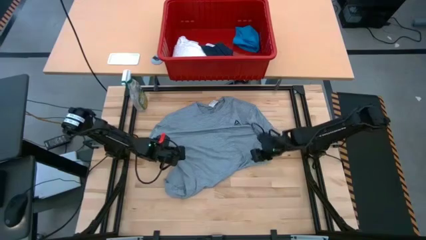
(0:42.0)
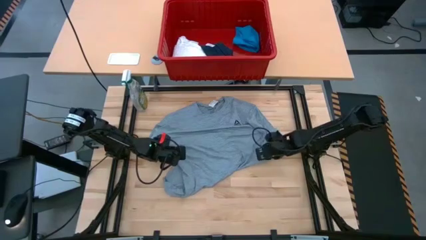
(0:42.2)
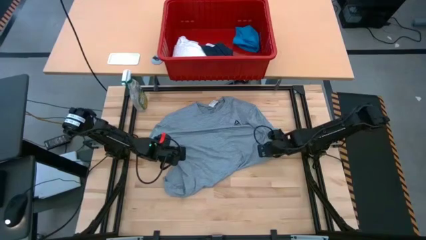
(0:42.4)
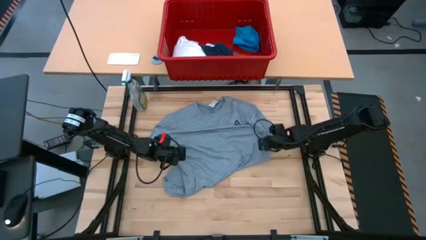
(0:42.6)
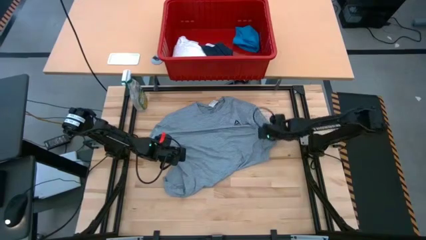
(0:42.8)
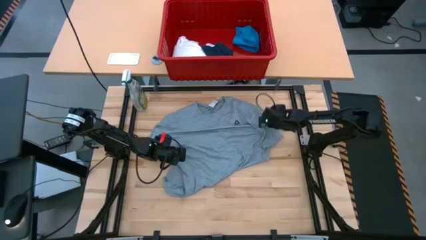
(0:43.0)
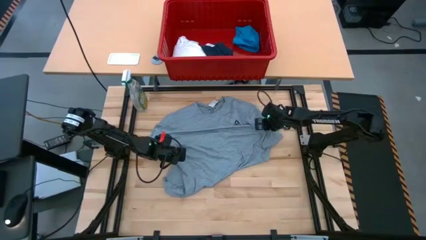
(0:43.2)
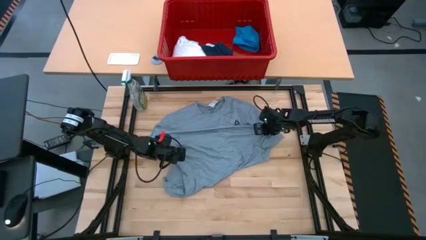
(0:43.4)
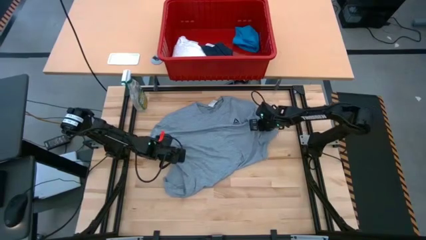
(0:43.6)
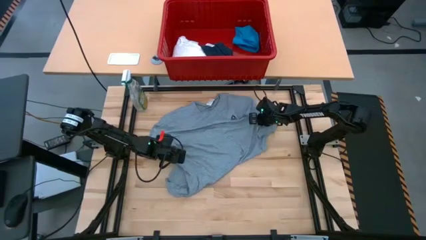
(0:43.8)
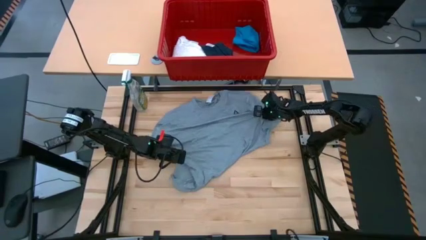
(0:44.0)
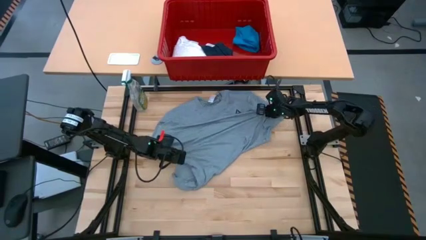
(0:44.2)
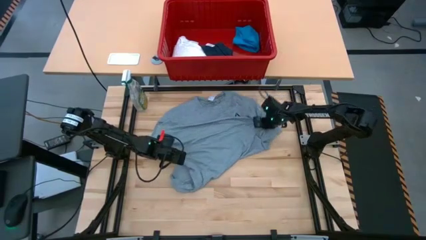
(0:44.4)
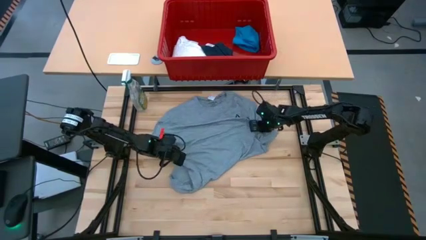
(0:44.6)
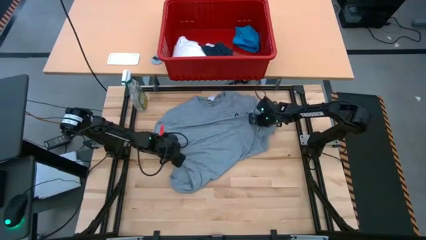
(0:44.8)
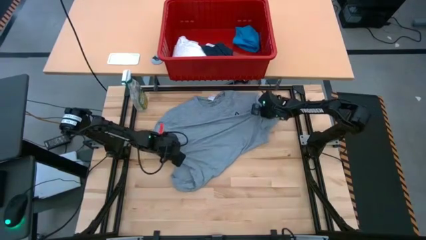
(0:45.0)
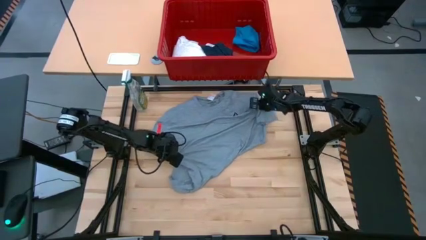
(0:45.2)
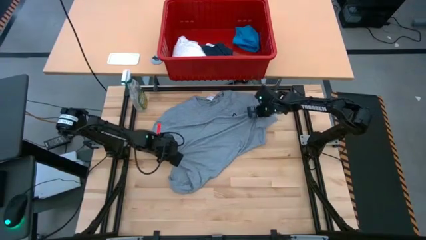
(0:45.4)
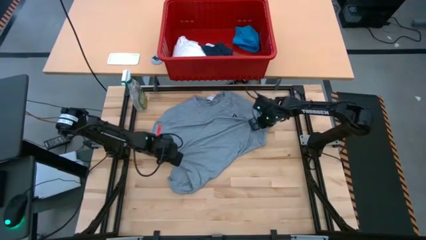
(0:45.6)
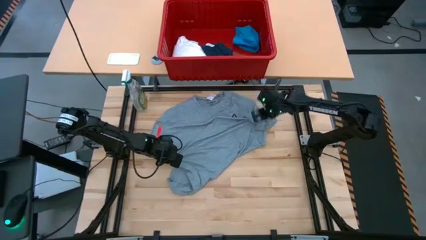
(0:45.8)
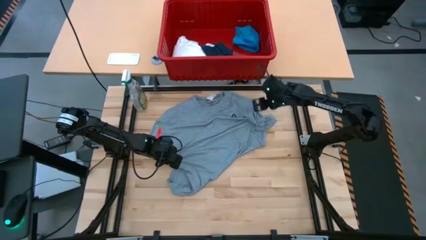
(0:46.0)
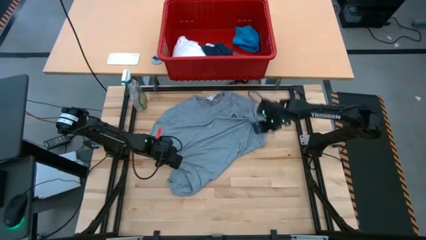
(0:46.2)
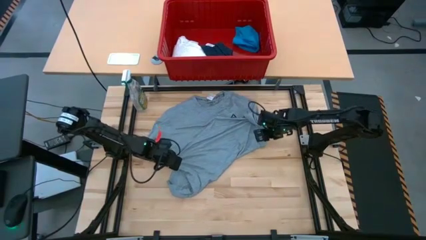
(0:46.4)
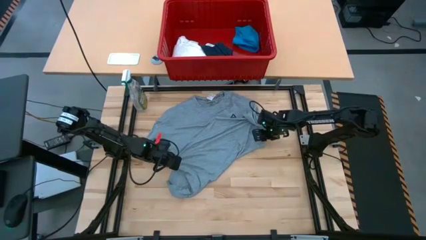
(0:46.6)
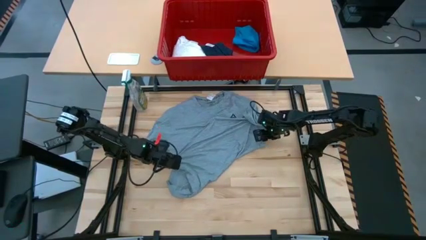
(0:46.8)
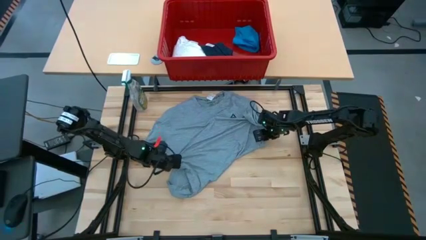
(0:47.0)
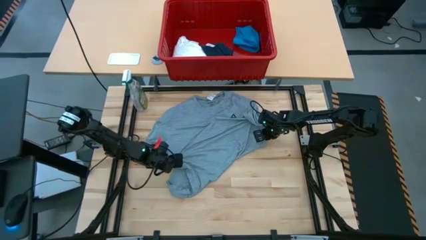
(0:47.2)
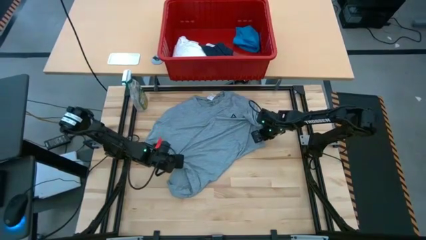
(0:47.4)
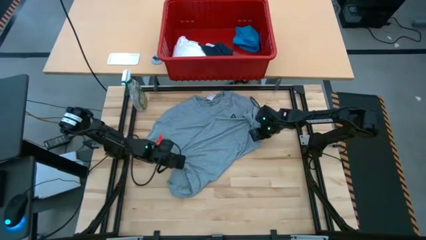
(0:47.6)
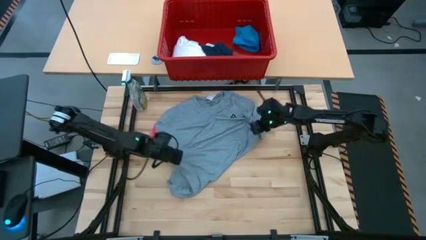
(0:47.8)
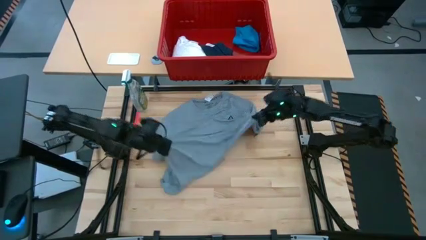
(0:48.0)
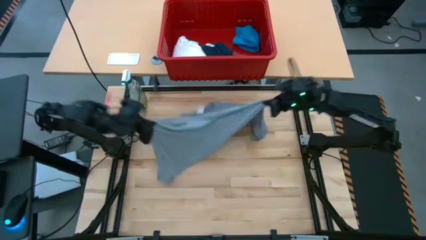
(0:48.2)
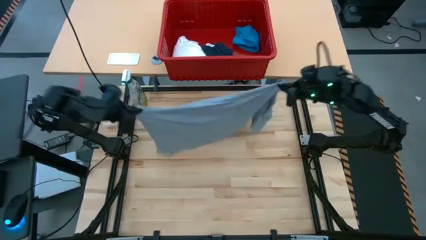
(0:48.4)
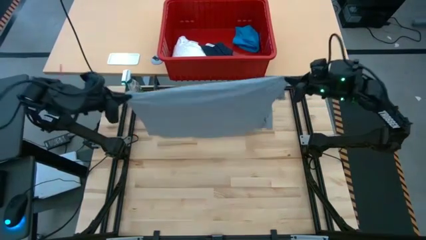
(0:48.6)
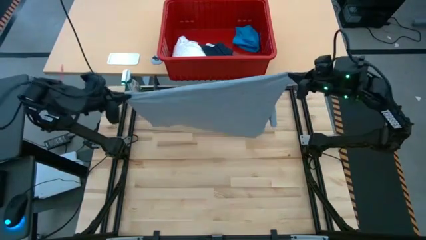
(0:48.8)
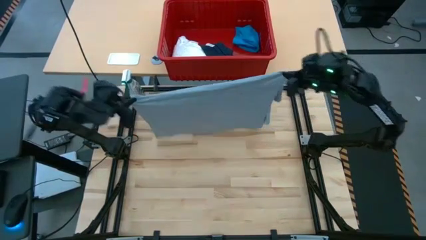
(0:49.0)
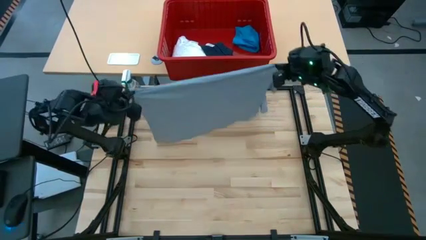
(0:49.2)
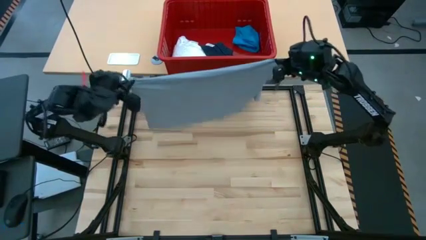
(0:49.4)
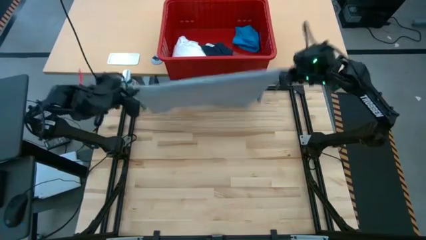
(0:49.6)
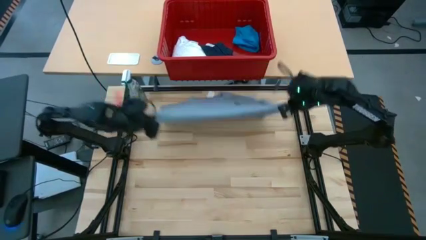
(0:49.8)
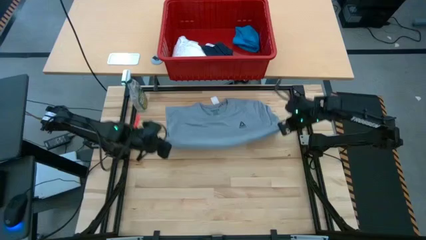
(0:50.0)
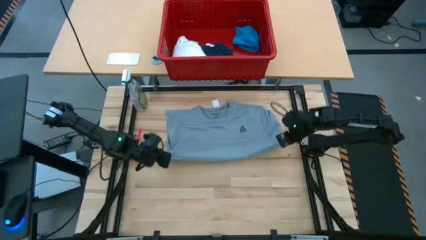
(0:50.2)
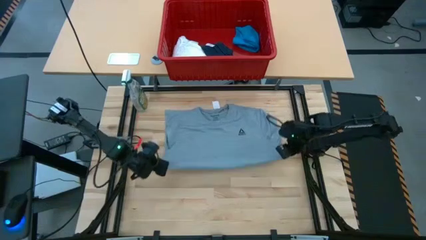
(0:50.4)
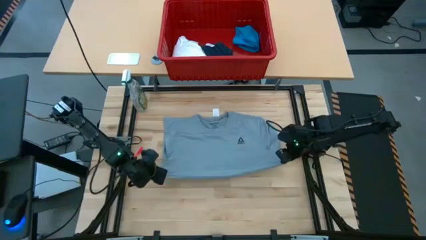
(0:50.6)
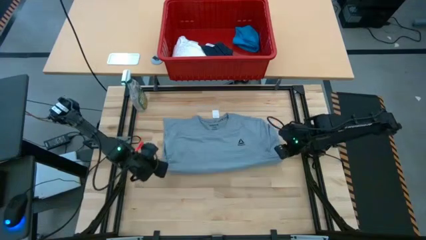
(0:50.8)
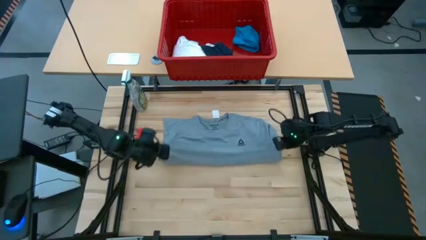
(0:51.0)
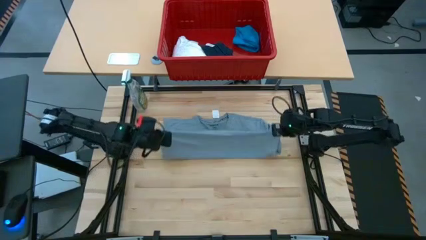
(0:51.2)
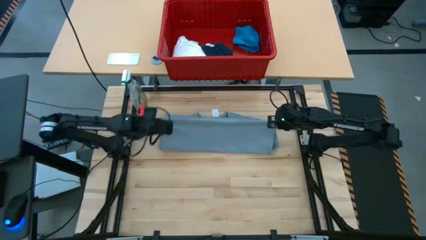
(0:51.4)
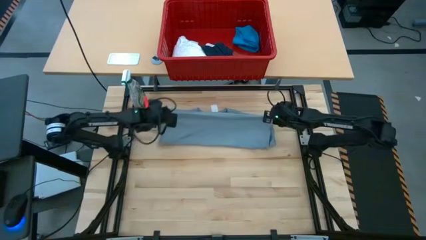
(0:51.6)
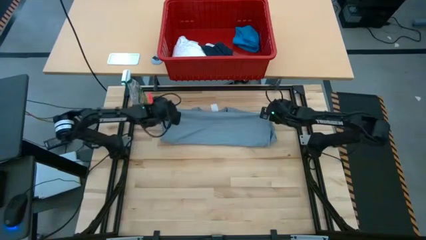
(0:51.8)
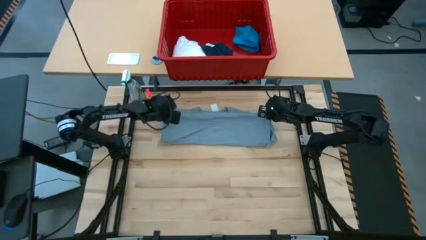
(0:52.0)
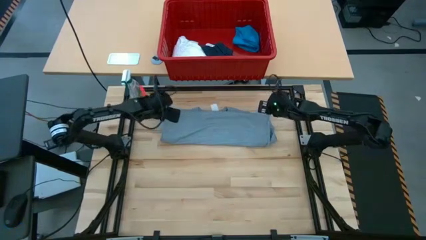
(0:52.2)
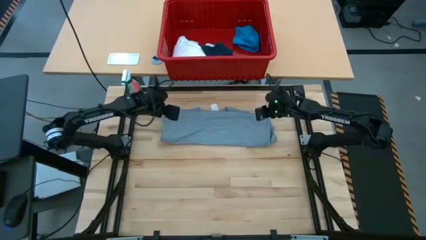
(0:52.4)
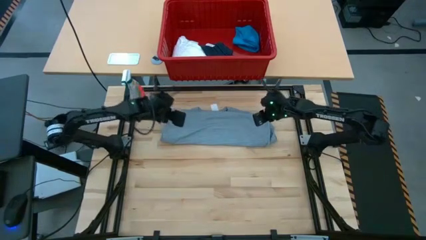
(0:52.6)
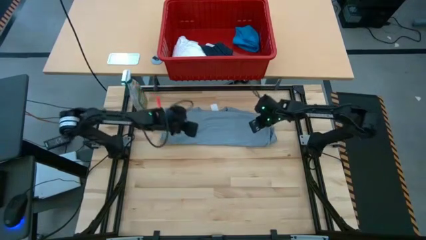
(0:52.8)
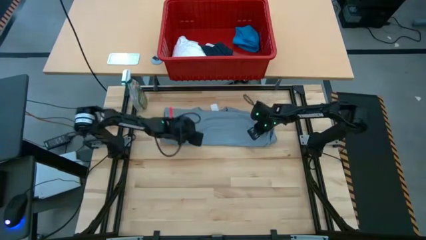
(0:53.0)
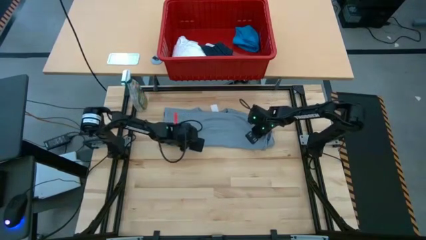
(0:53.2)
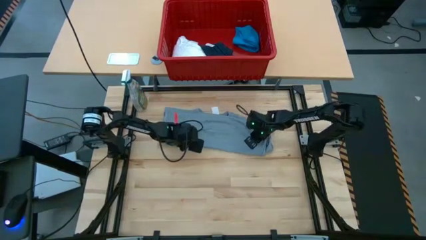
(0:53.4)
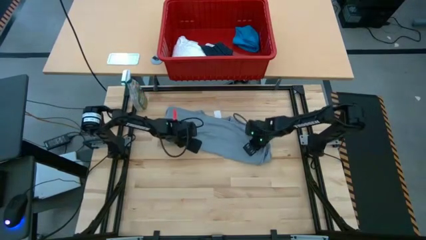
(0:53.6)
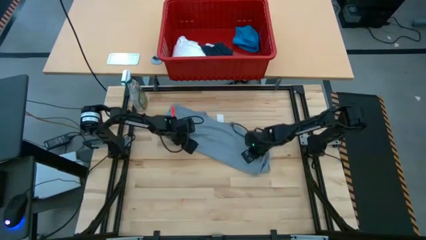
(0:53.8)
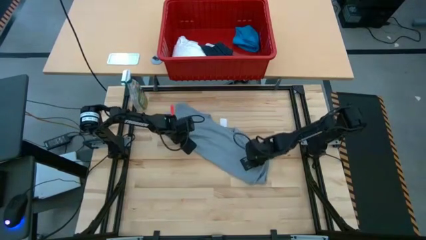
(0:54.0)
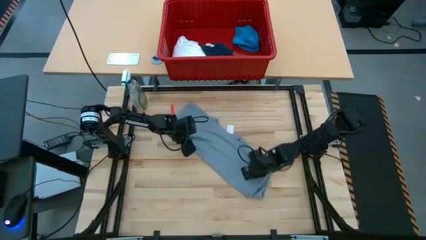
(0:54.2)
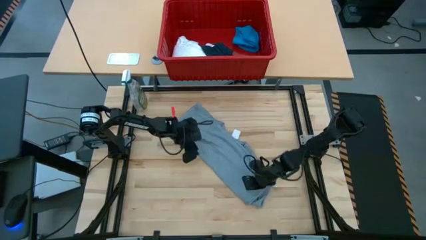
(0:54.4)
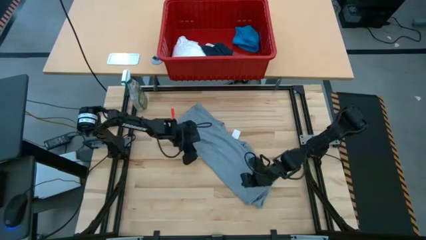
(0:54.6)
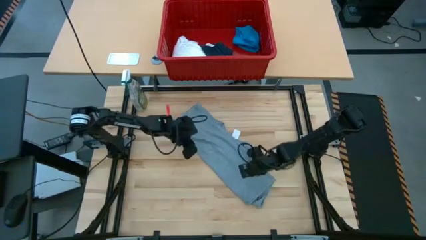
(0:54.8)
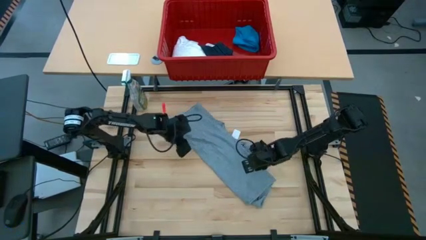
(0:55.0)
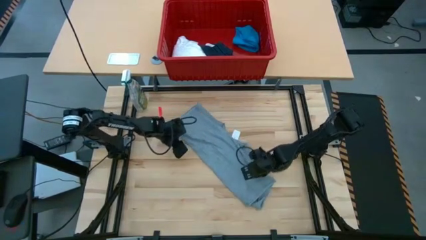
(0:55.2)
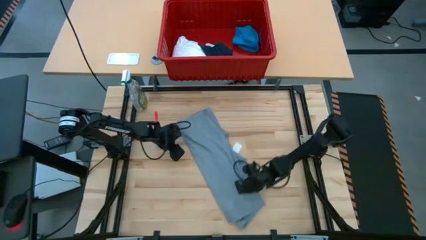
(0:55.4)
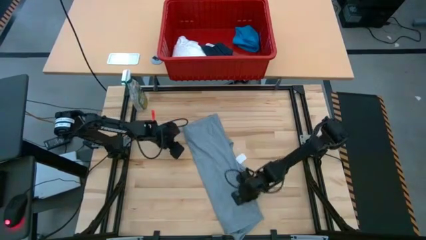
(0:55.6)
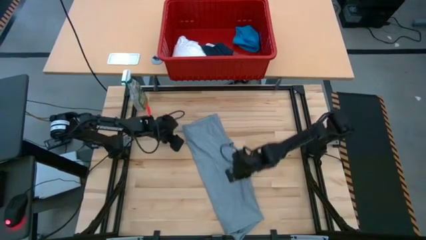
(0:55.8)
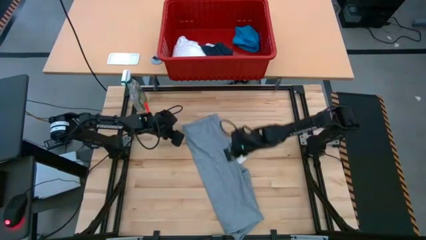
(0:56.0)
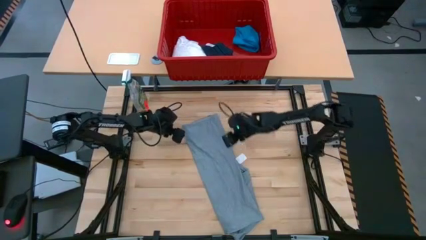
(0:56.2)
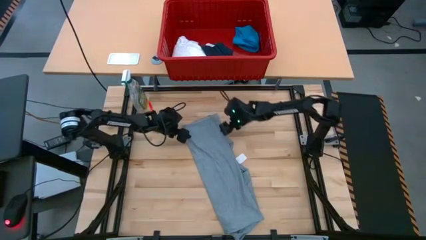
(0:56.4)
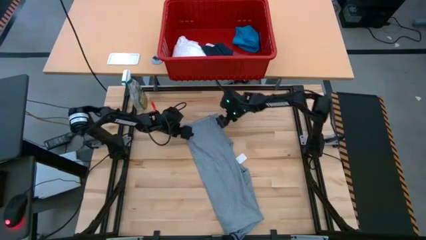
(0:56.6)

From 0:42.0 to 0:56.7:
Task: Fold laundry
Fold the gray shirt
